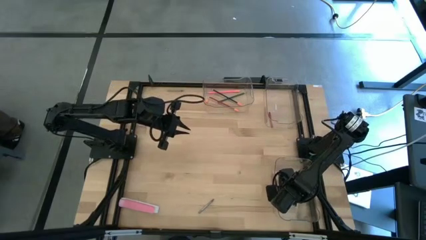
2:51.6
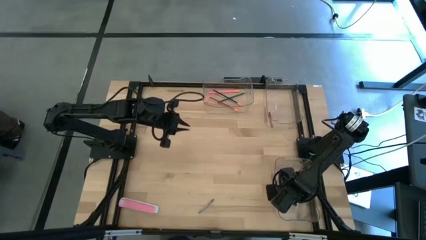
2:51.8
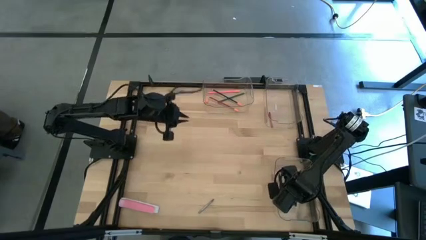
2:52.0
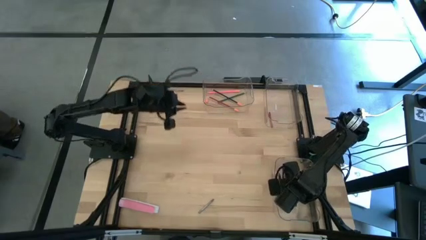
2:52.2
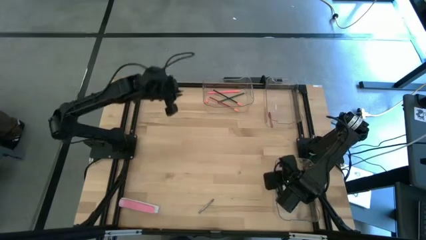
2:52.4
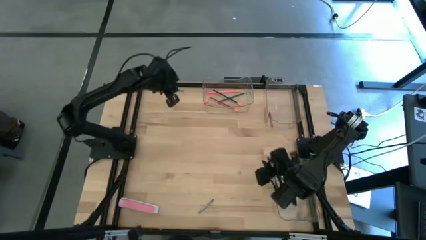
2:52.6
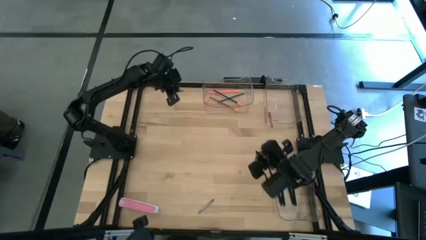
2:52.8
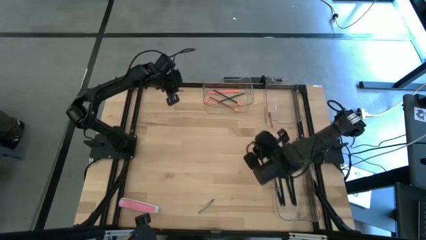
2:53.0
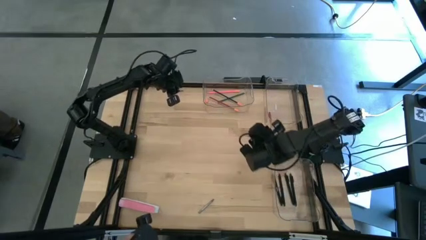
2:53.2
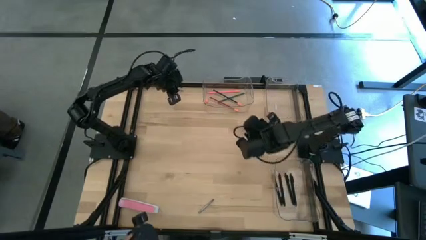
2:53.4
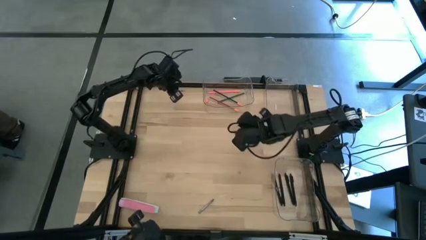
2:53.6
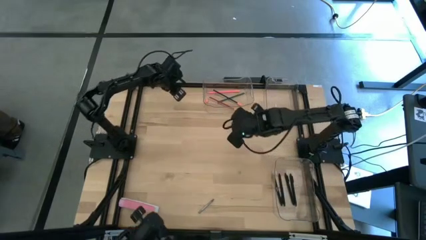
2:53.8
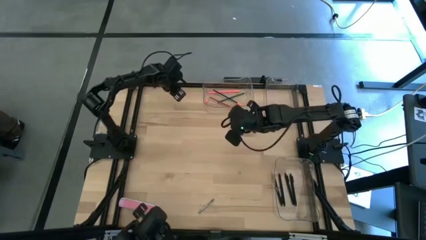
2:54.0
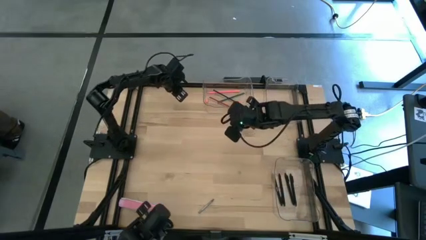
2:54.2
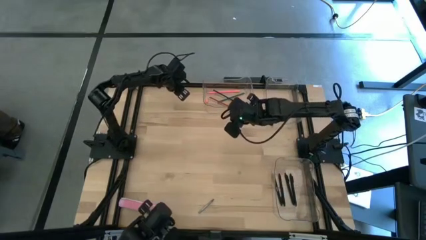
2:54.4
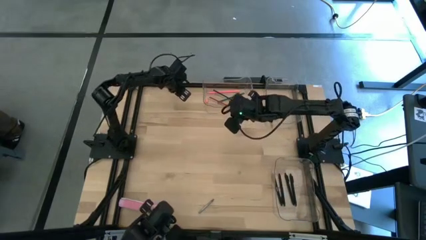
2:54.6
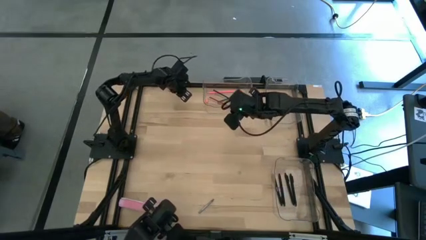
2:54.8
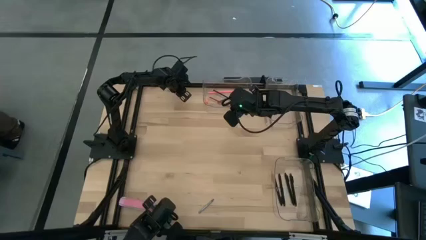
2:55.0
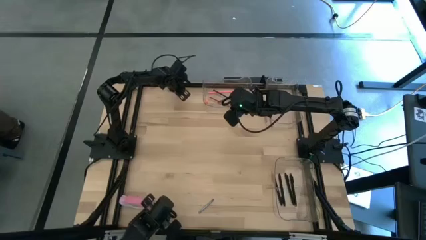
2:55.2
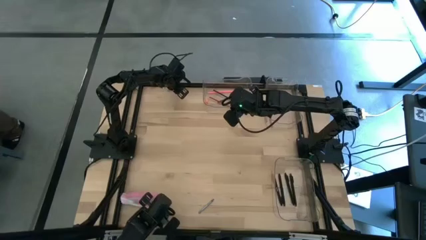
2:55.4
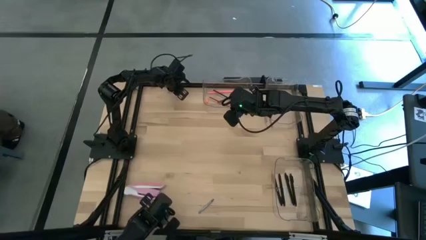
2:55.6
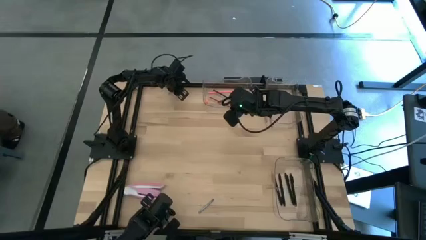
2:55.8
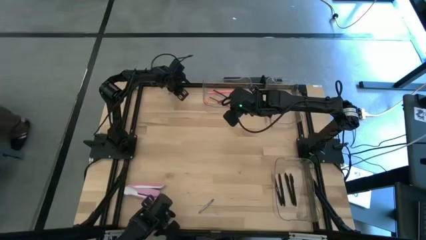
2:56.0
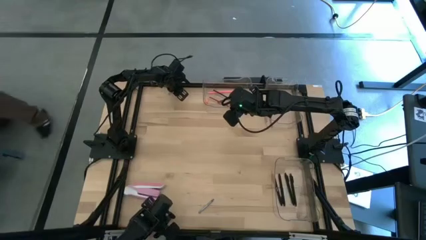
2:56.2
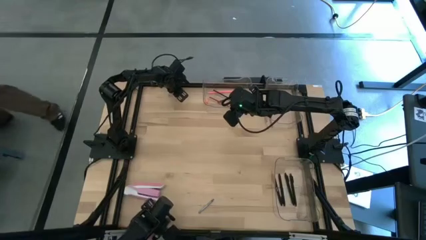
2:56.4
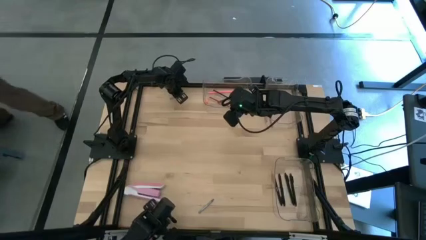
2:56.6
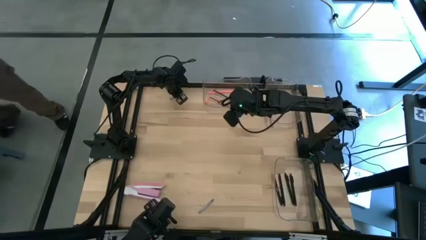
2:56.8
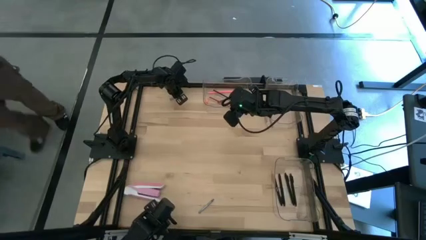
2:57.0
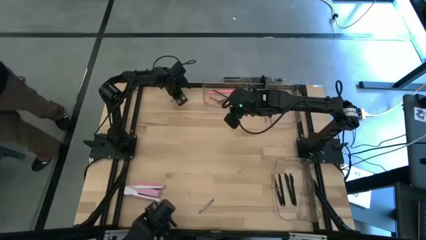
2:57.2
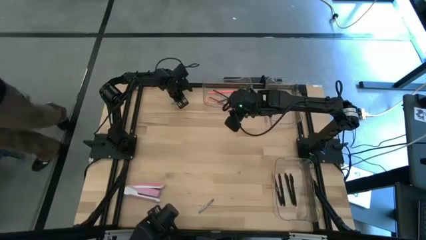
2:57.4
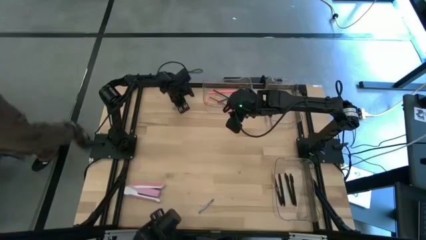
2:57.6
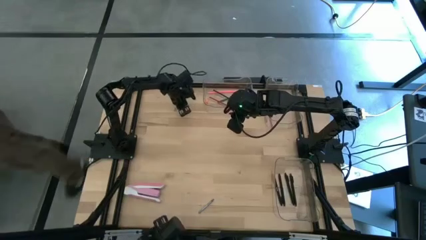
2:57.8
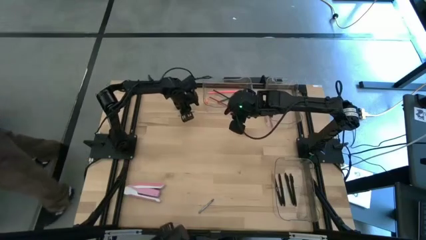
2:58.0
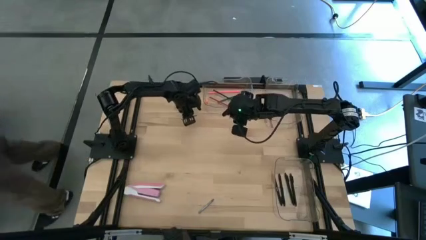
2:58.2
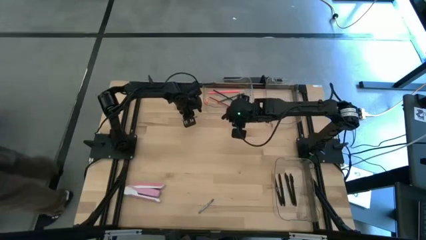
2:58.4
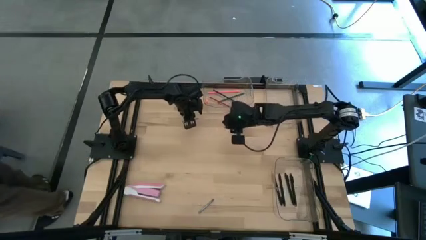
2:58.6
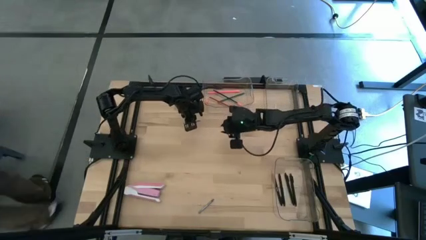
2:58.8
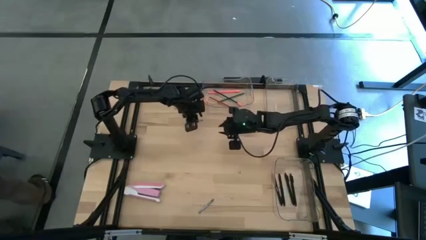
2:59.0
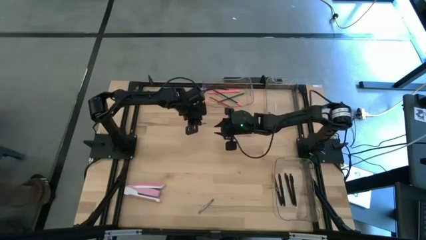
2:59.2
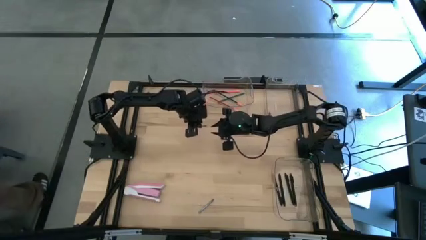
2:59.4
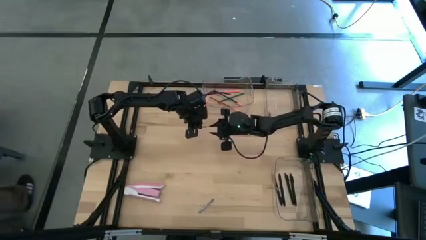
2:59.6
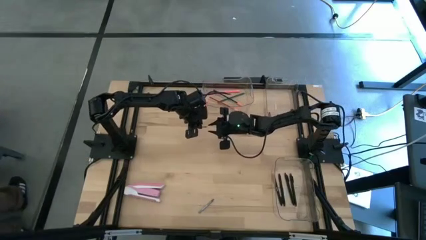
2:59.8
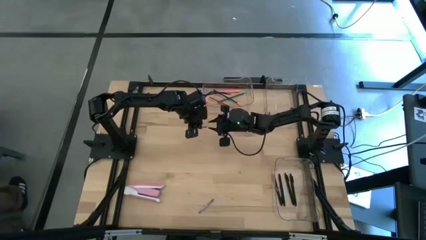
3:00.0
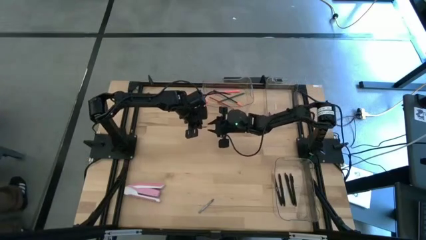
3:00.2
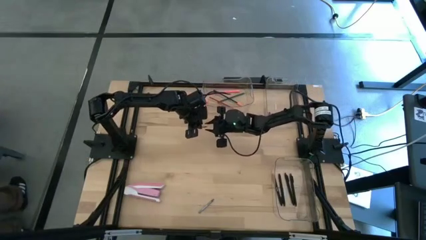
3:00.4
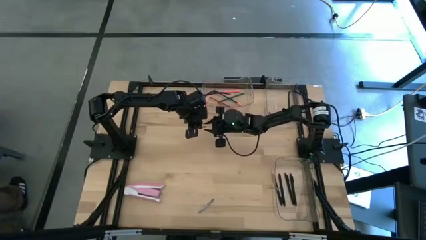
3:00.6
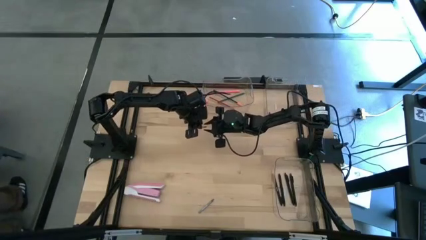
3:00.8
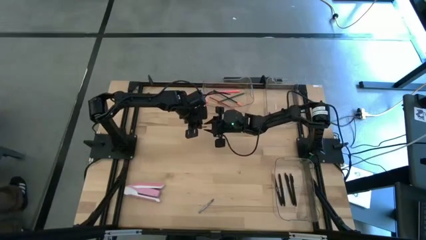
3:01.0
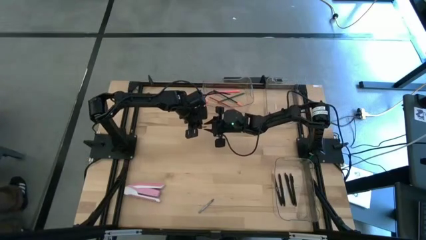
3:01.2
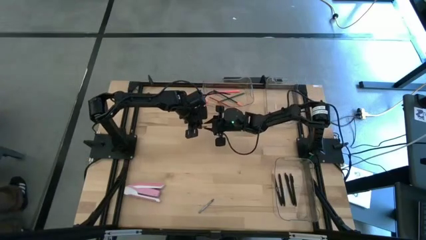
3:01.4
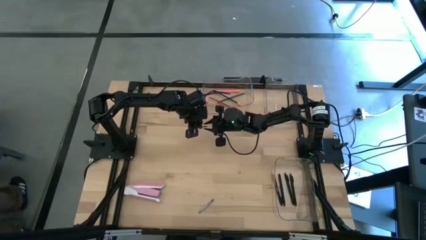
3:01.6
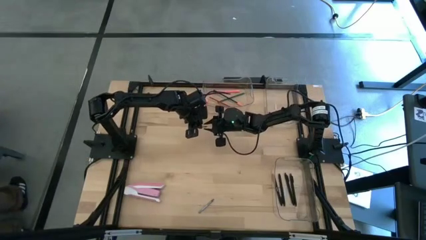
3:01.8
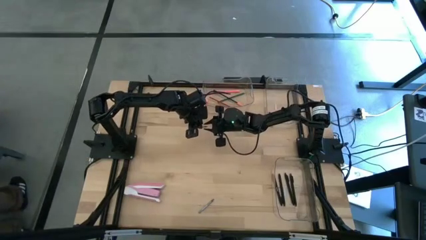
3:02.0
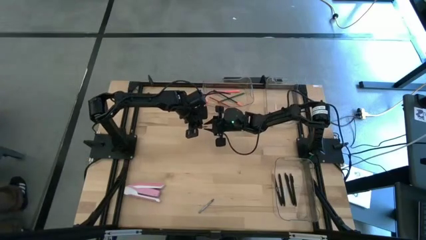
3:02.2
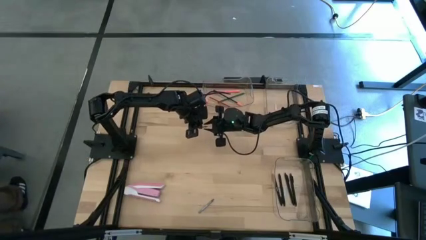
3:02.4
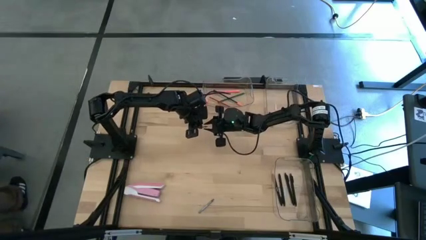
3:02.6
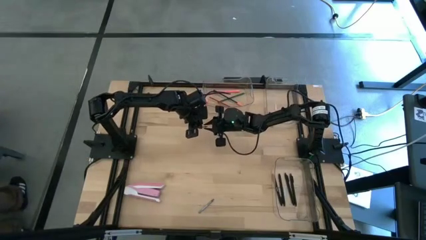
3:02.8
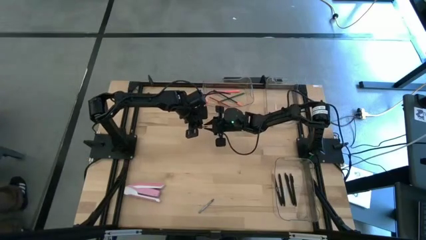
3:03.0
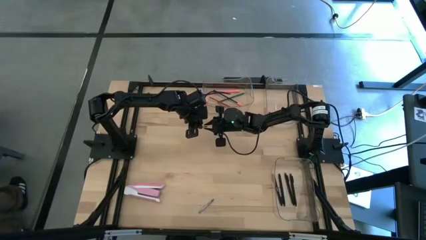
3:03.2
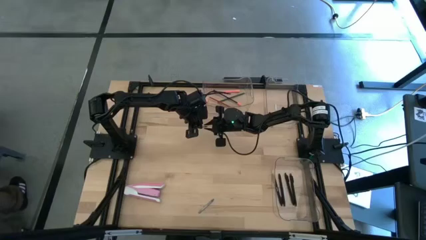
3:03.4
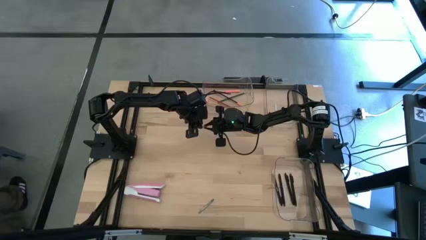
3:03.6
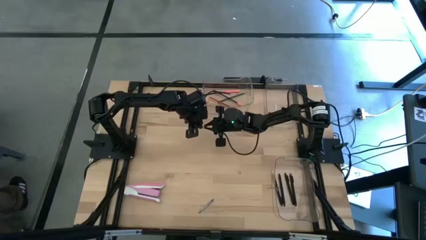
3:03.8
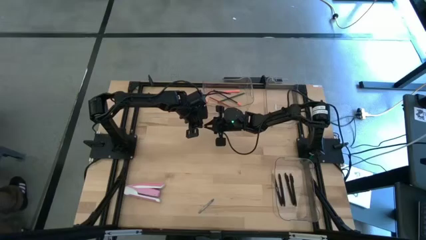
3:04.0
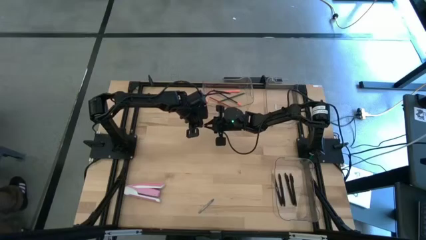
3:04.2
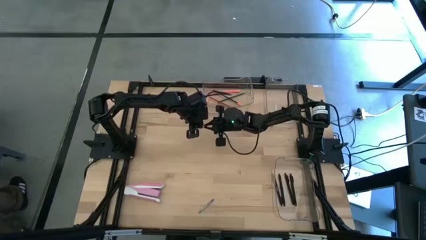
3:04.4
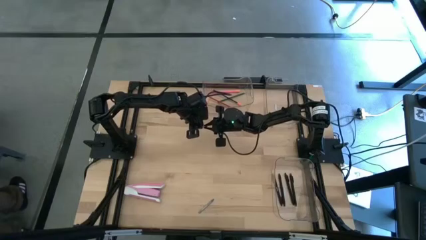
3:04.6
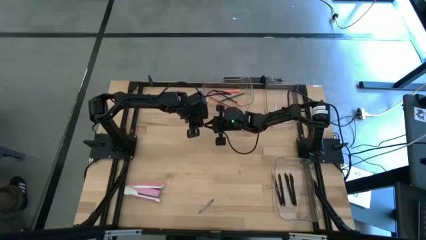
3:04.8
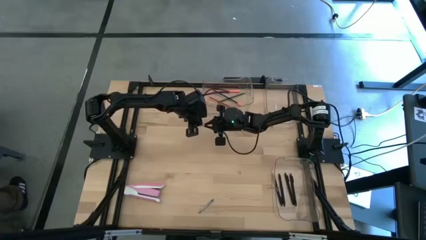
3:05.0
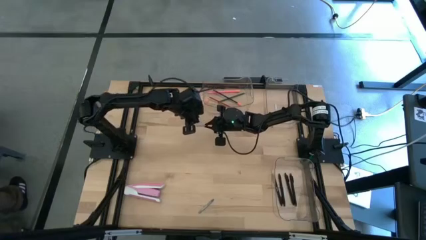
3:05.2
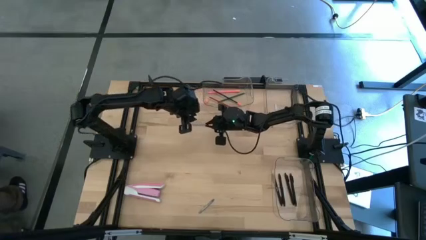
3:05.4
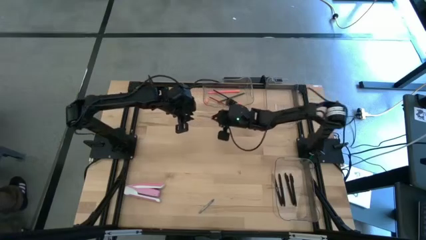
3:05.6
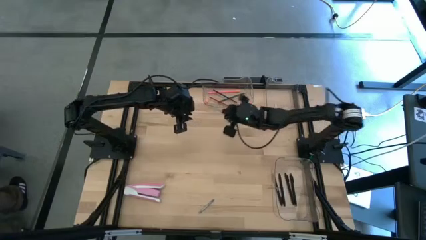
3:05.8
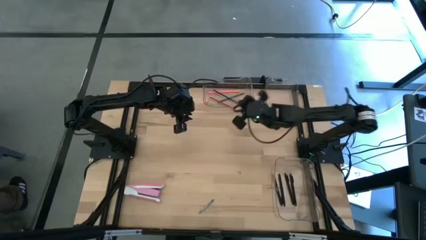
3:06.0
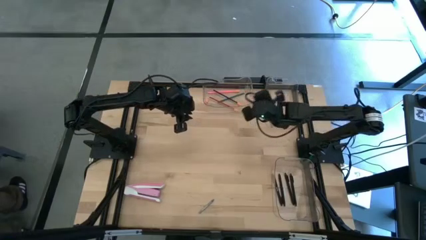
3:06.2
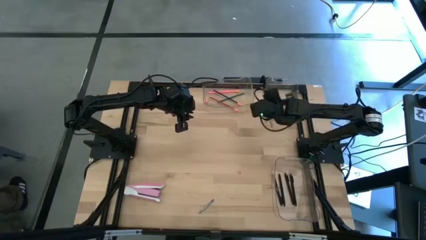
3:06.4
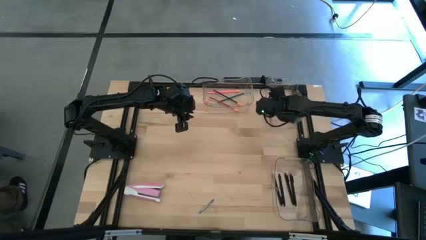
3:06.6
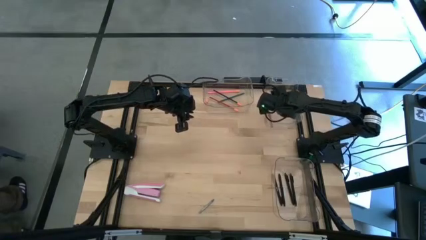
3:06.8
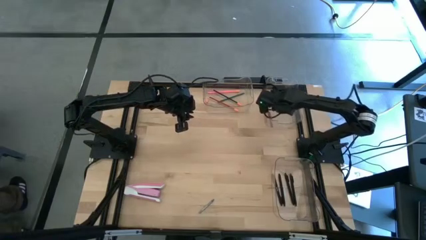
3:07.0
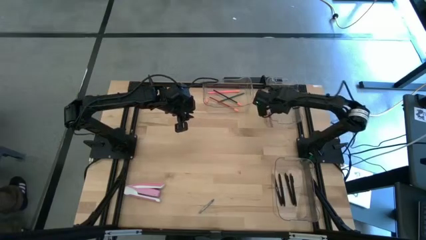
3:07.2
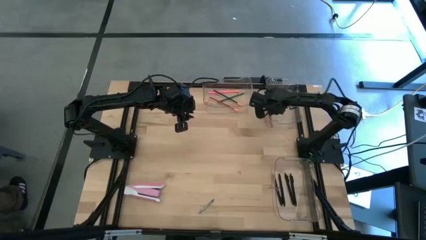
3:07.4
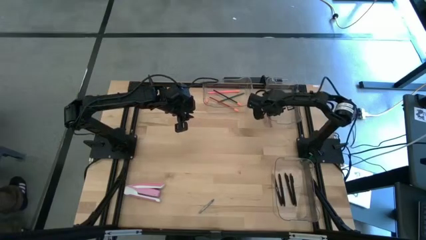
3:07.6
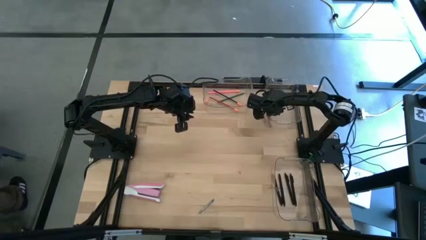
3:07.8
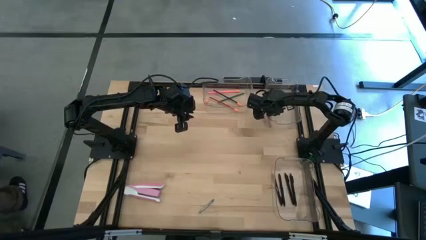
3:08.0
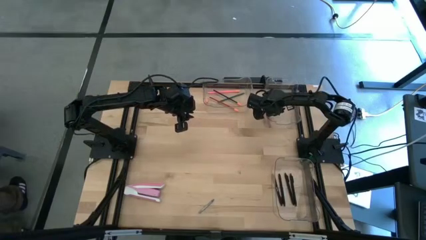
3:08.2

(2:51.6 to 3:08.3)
Task: Sort crayons/erasers/pens/pencils in bins
Put the top gray crayon into the top right transparent bin
